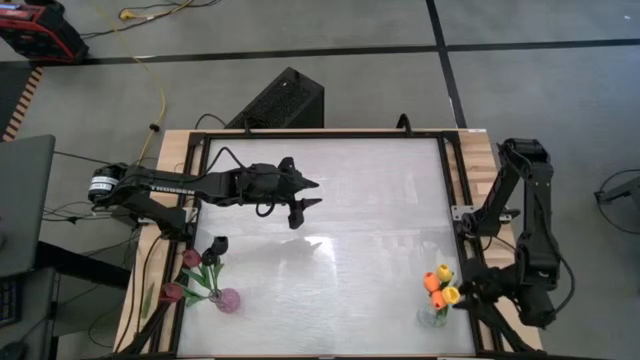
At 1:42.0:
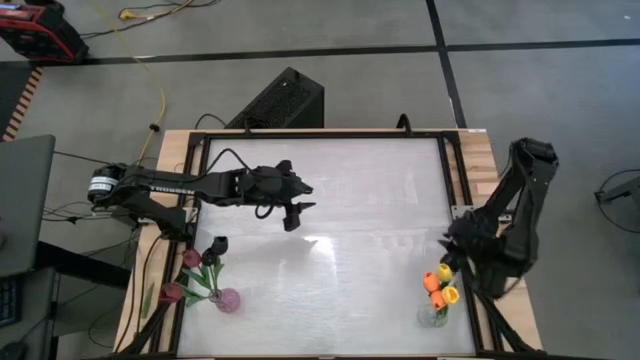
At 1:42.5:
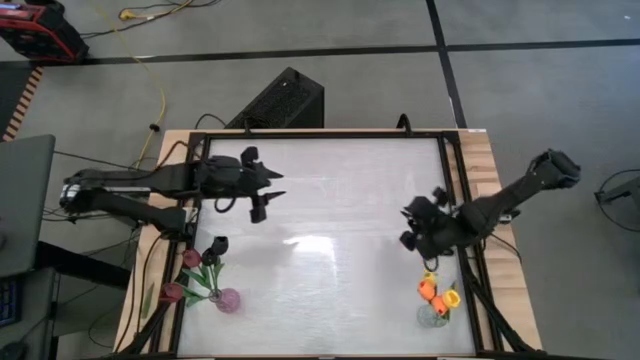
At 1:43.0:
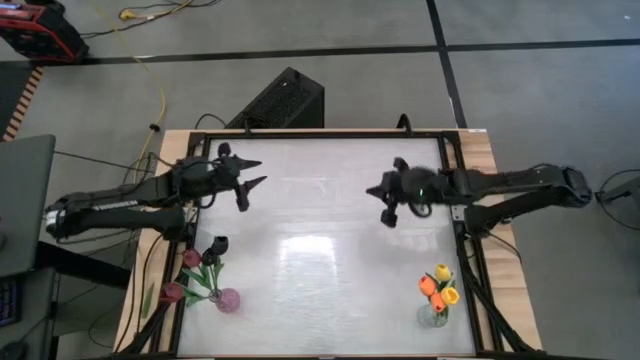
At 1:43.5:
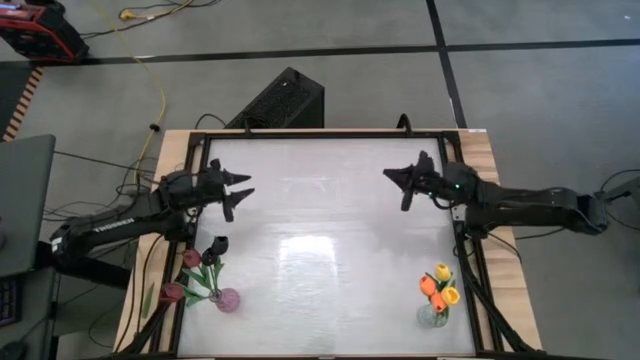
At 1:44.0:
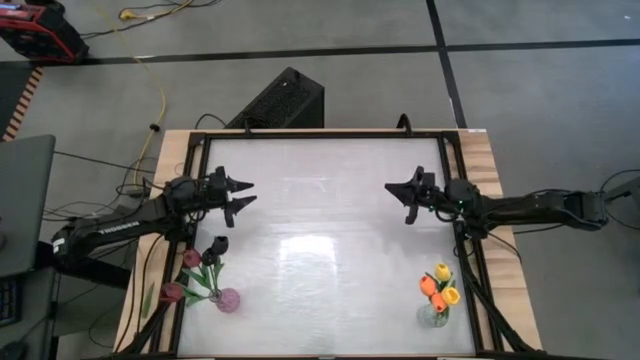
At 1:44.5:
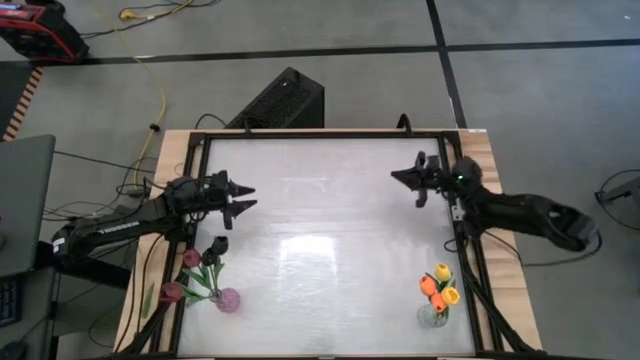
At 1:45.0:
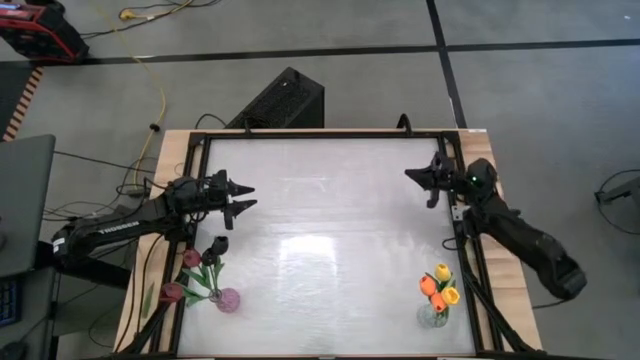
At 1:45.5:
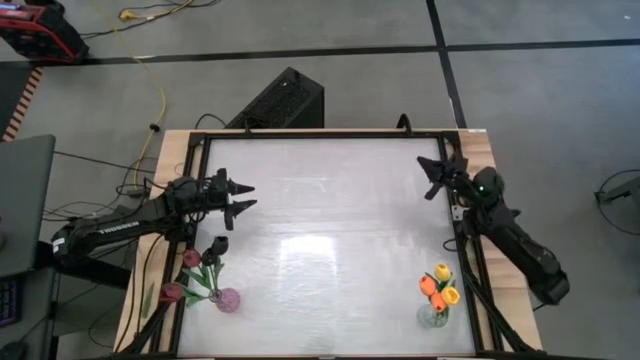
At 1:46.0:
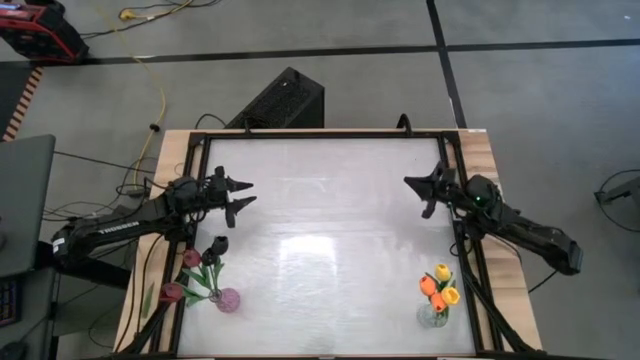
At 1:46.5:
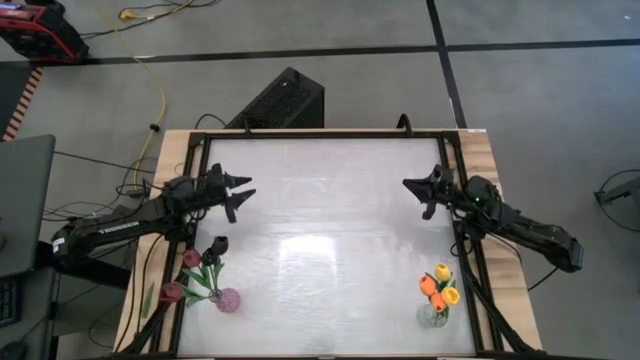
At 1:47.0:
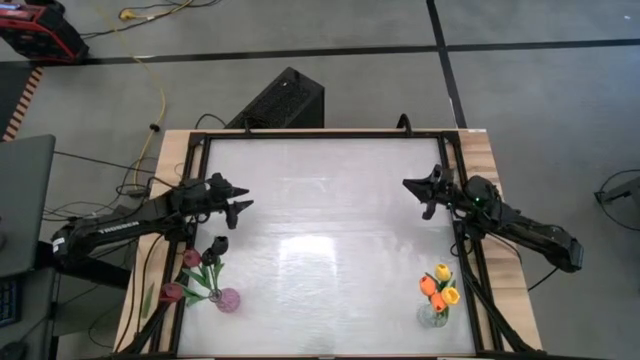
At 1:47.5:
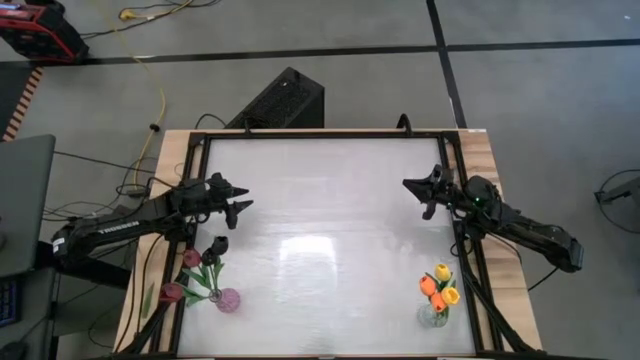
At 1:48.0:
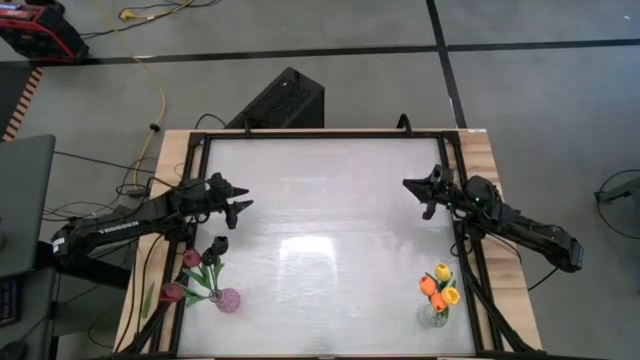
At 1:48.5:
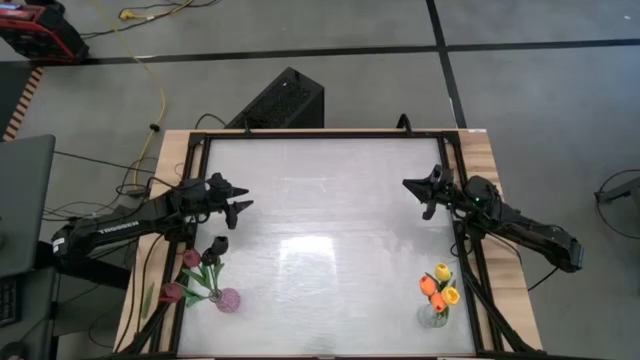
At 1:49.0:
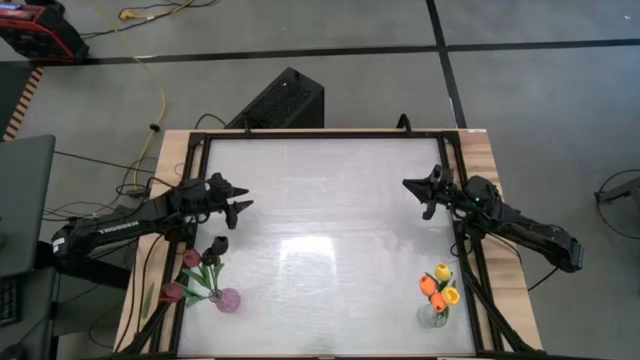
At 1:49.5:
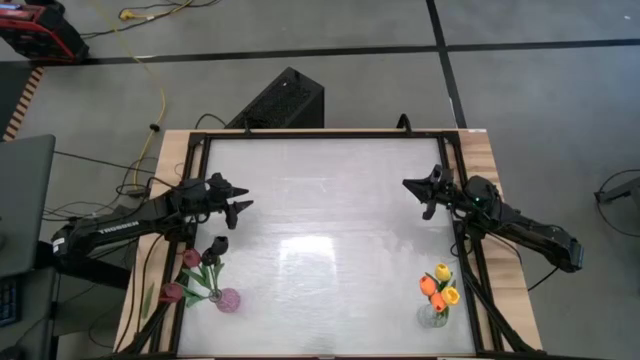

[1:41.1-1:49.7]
Task: Sort flowers into vase by color
Return to Home Position

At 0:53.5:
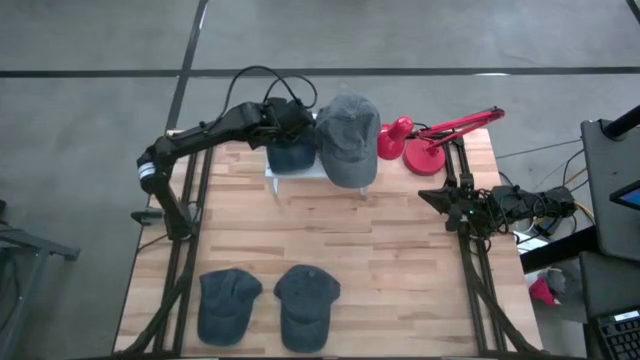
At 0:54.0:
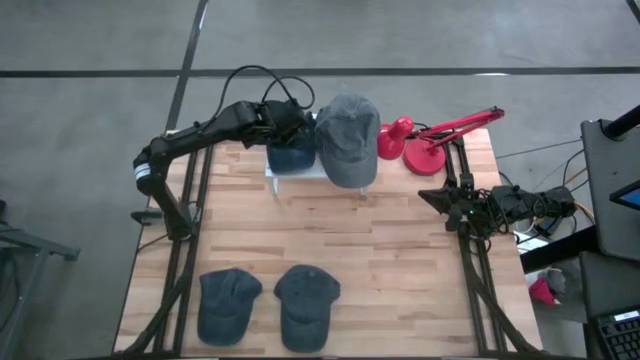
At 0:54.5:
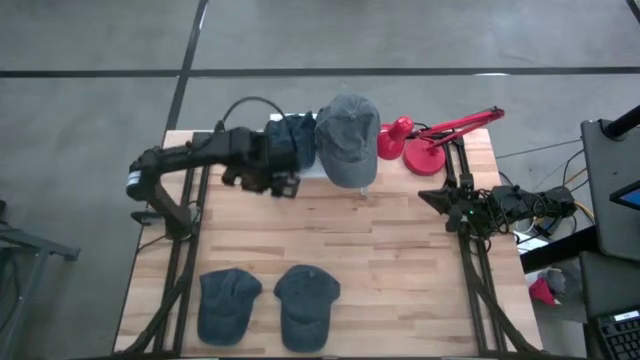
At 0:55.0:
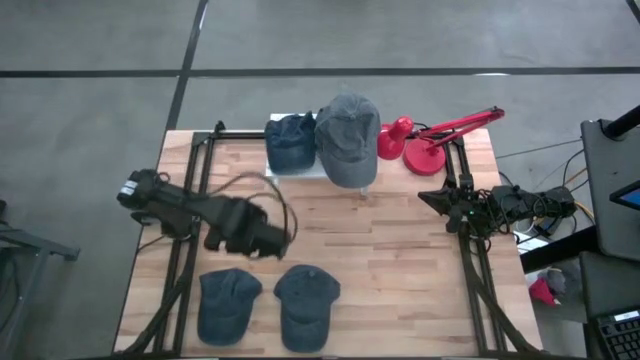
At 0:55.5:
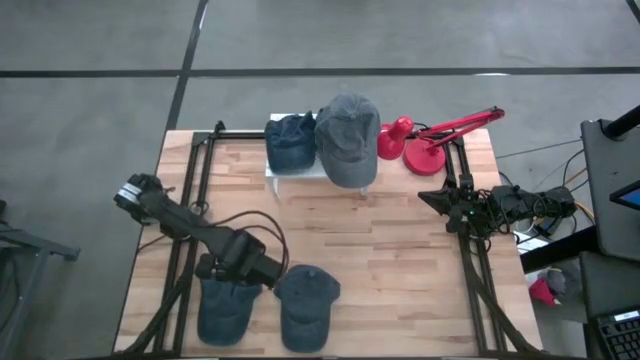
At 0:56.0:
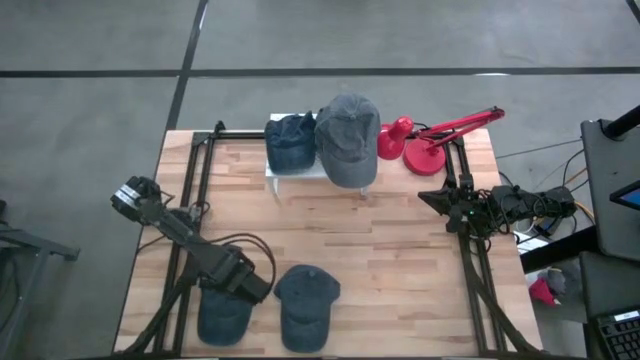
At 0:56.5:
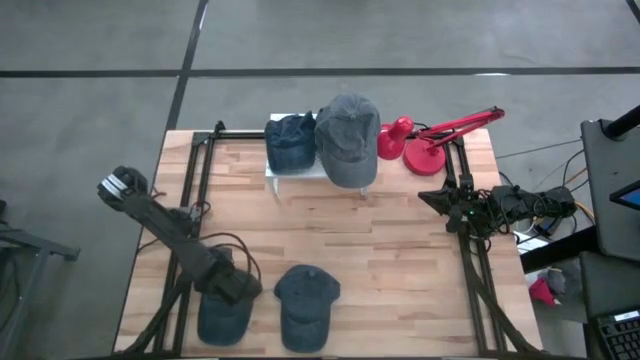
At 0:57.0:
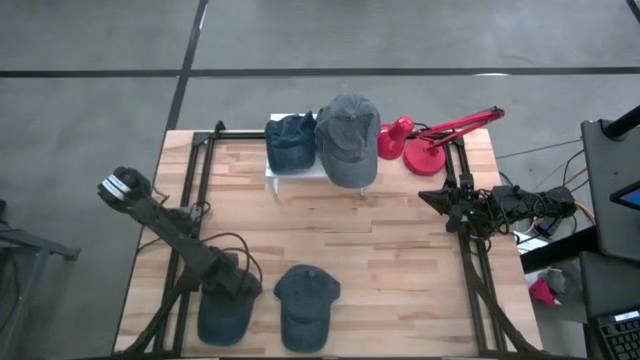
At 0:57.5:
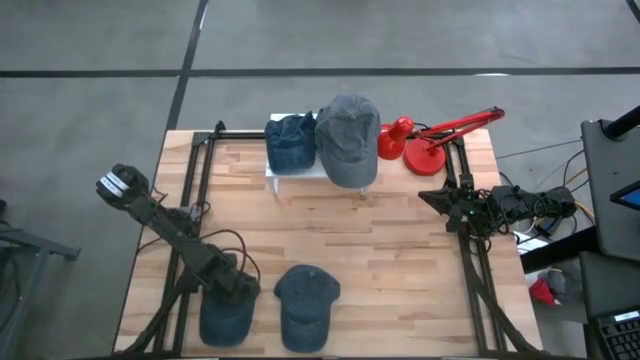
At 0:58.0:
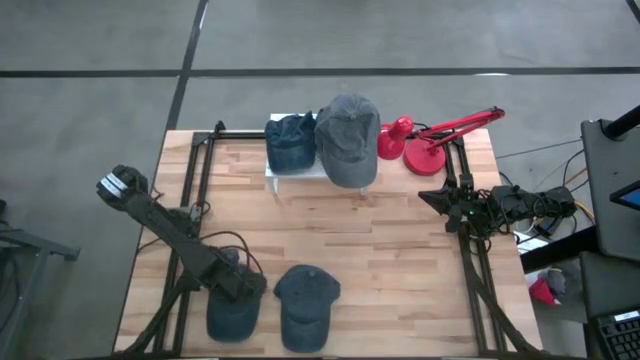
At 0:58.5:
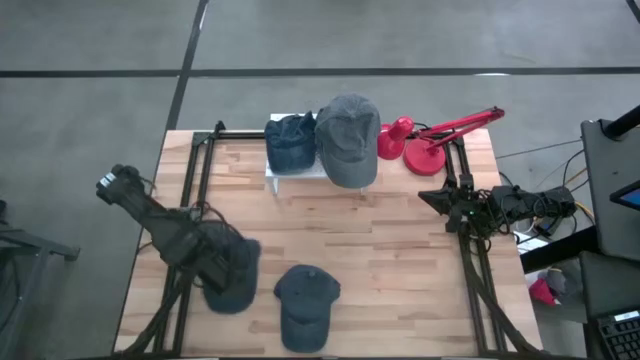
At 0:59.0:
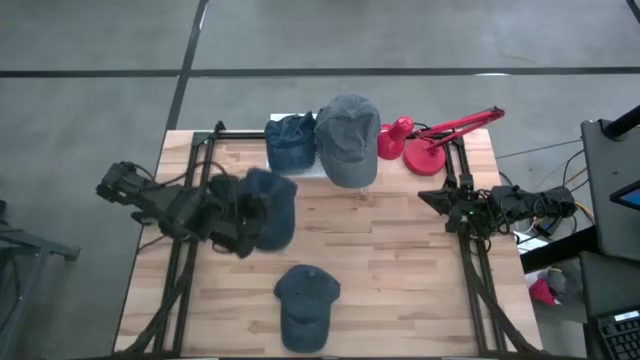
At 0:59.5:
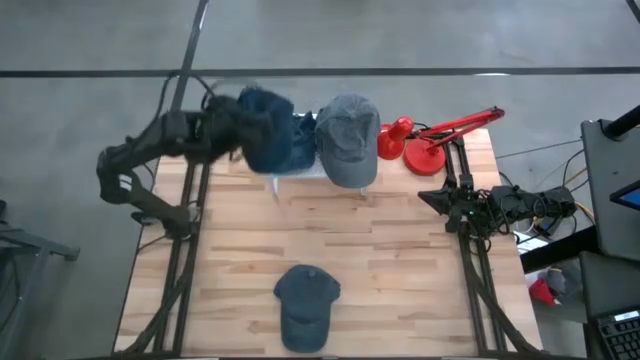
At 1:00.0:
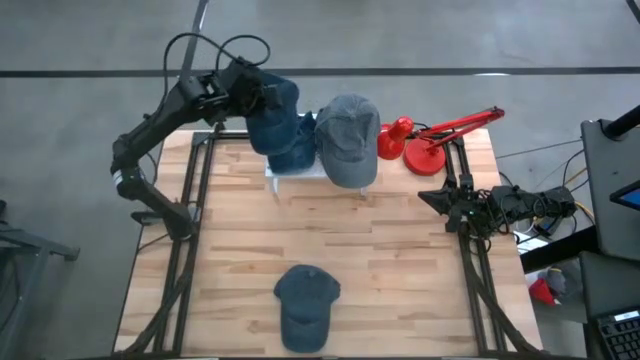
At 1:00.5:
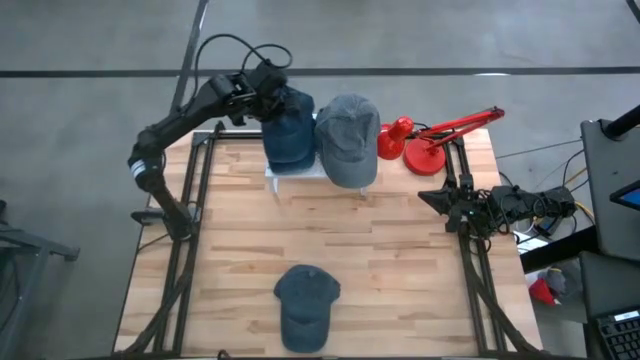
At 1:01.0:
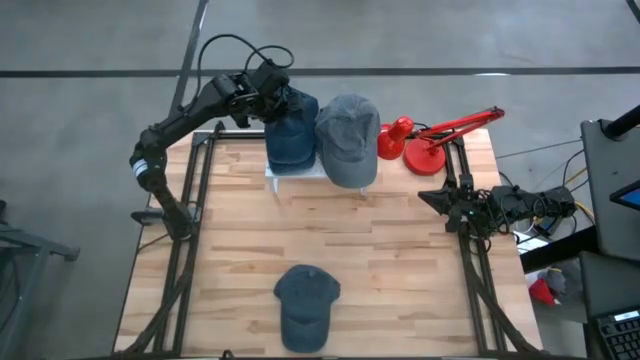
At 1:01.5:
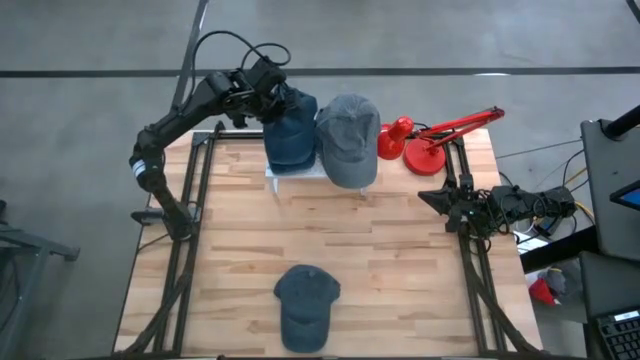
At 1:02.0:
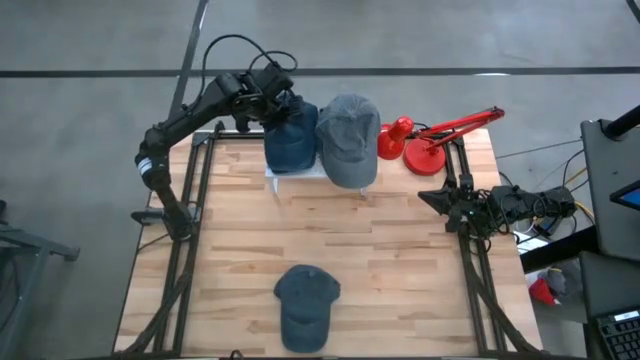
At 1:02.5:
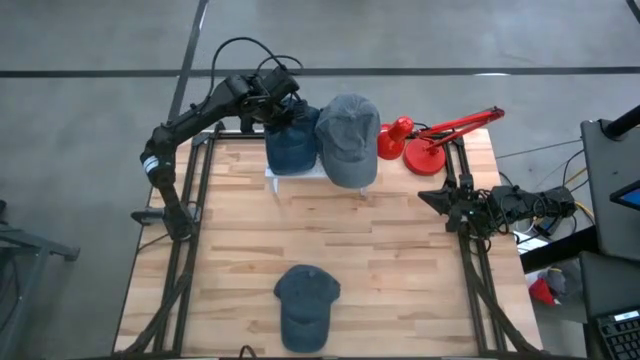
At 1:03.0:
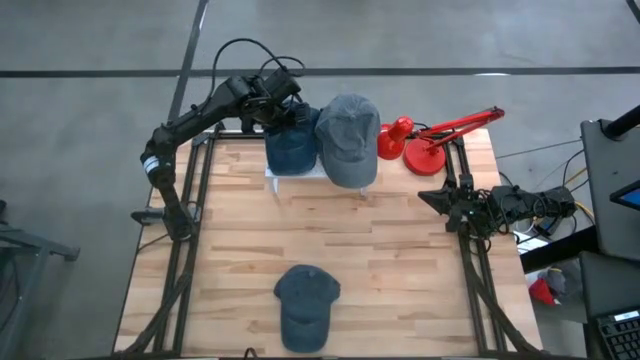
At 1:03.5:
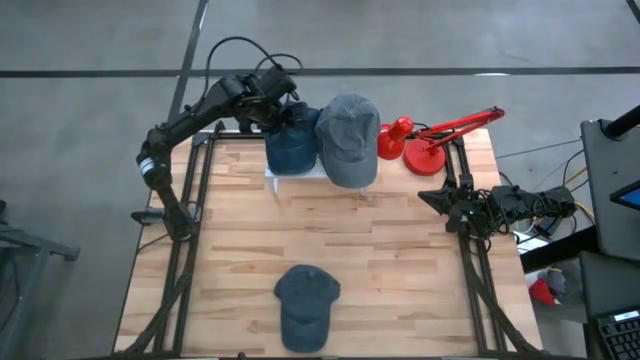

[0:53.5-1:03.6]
Task: Pick & Place hat
Stack the left blue cap on the blue cap on the shelf
